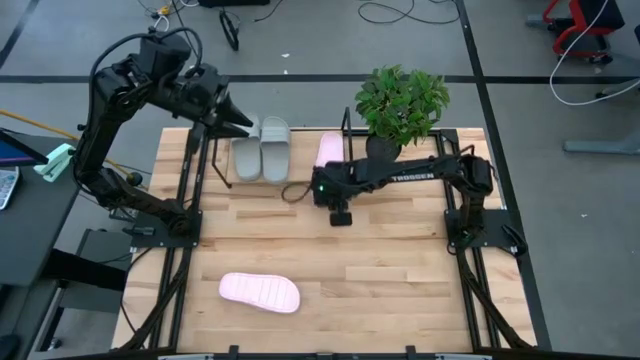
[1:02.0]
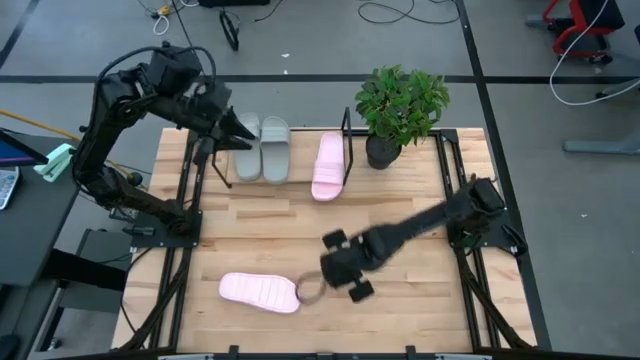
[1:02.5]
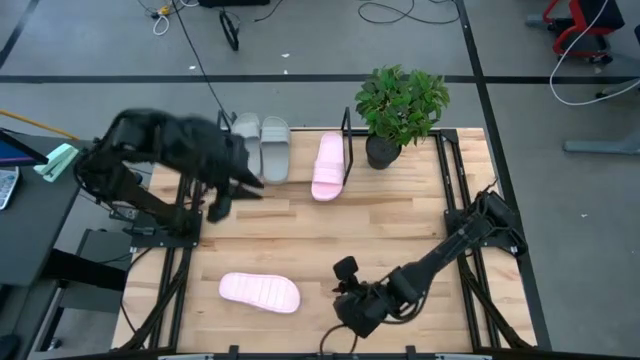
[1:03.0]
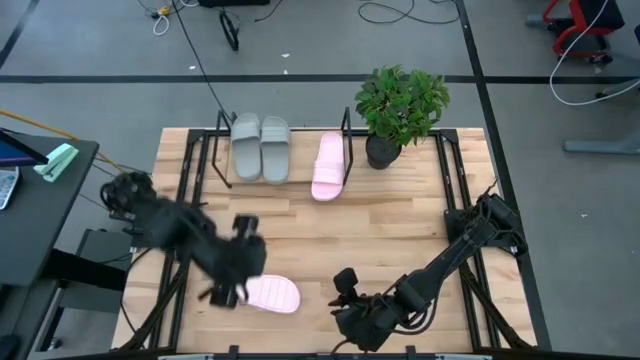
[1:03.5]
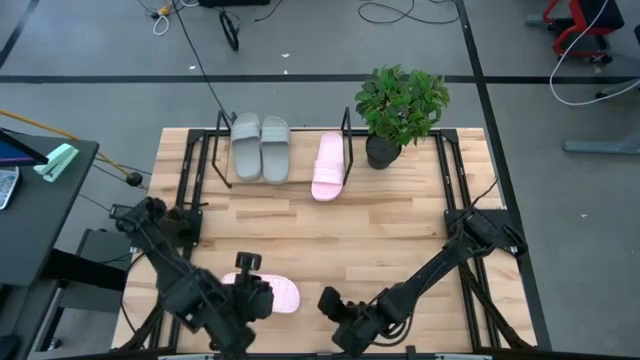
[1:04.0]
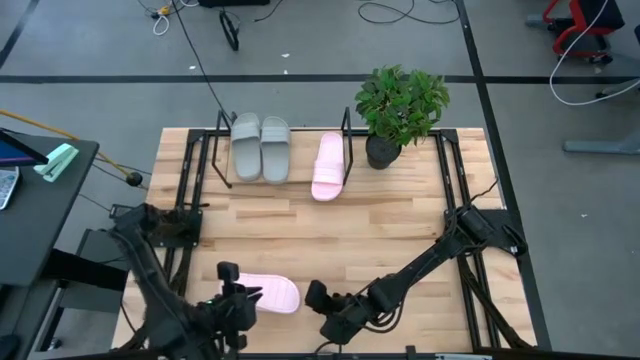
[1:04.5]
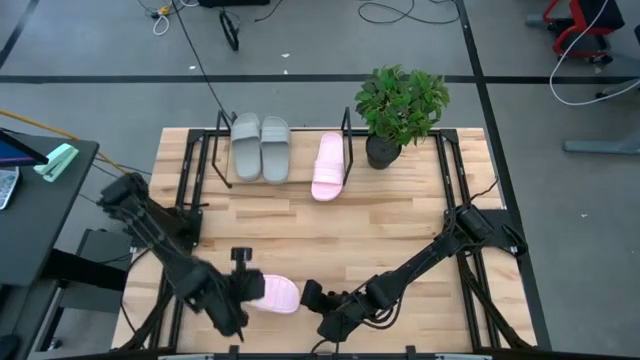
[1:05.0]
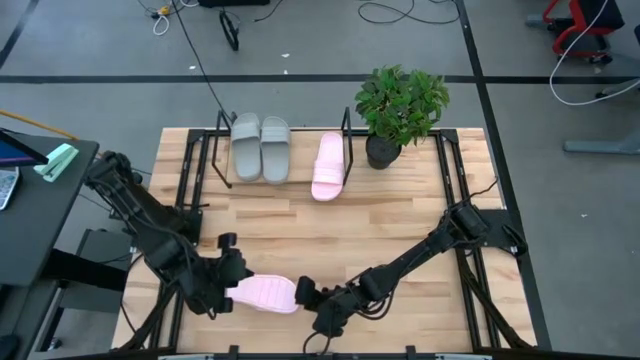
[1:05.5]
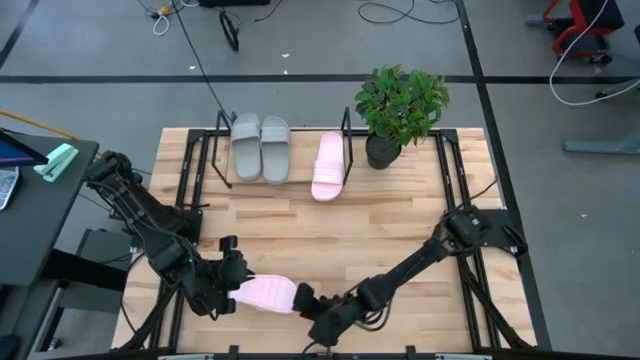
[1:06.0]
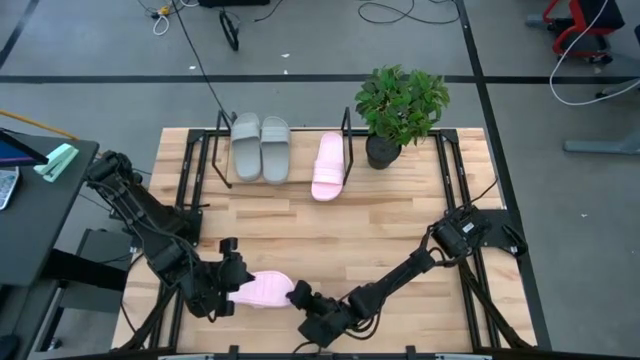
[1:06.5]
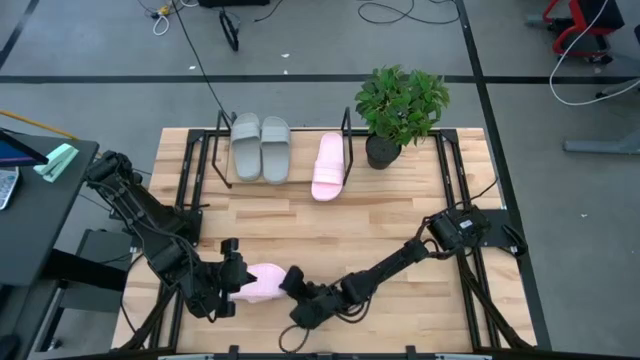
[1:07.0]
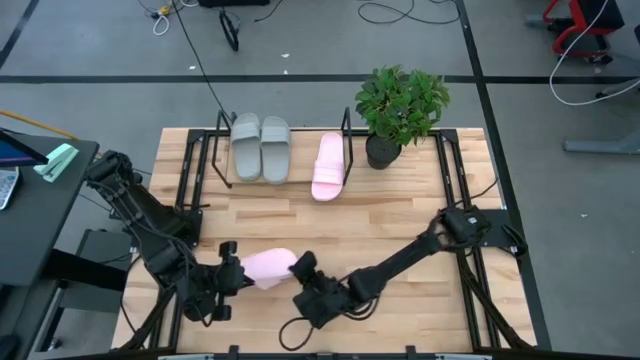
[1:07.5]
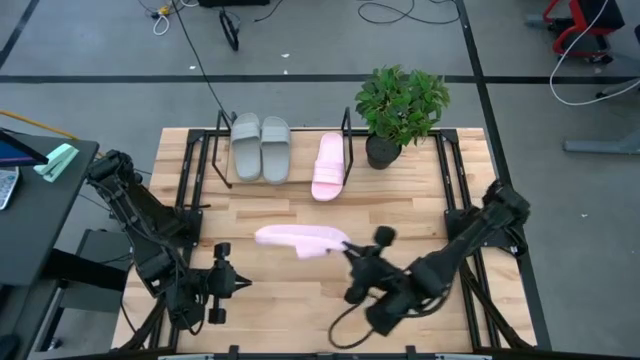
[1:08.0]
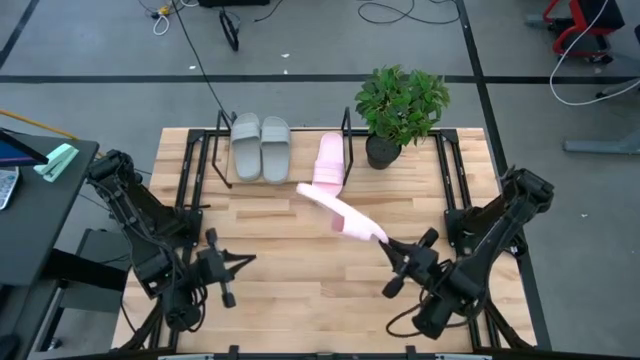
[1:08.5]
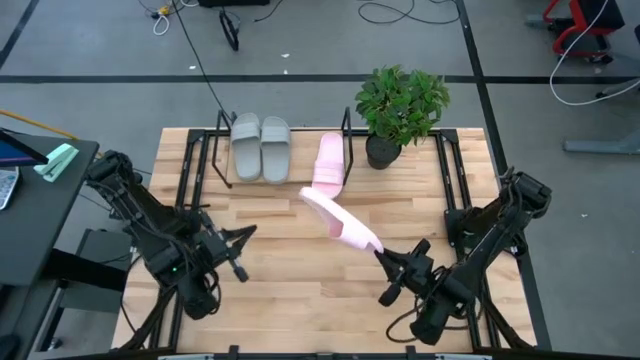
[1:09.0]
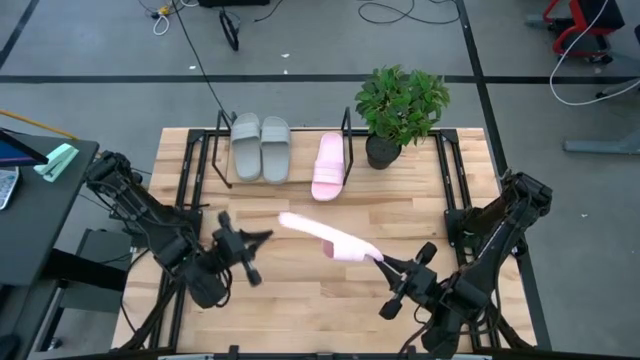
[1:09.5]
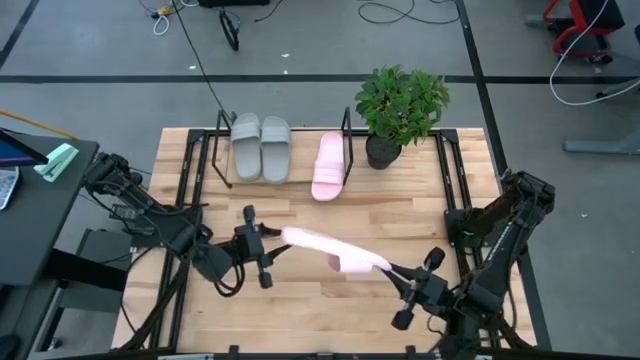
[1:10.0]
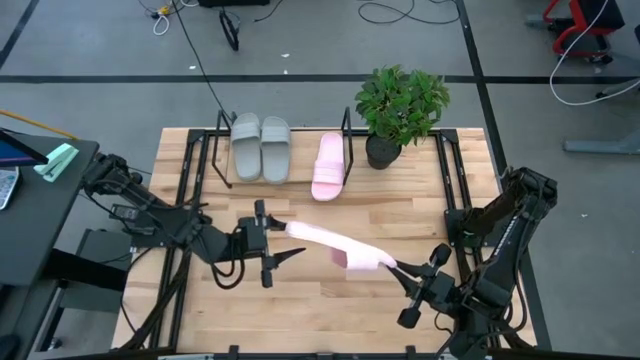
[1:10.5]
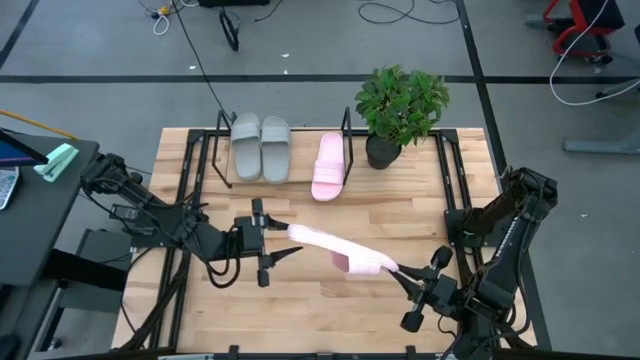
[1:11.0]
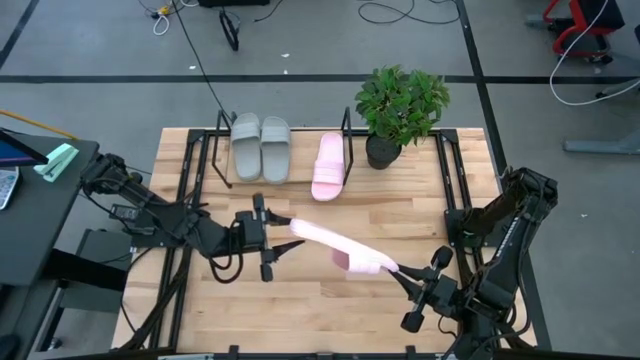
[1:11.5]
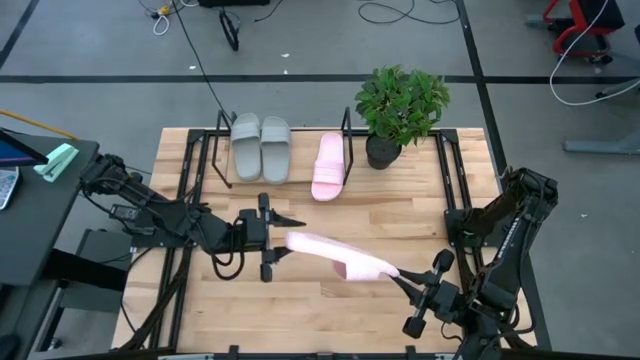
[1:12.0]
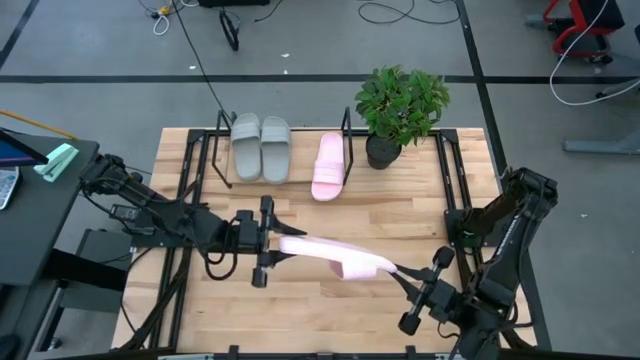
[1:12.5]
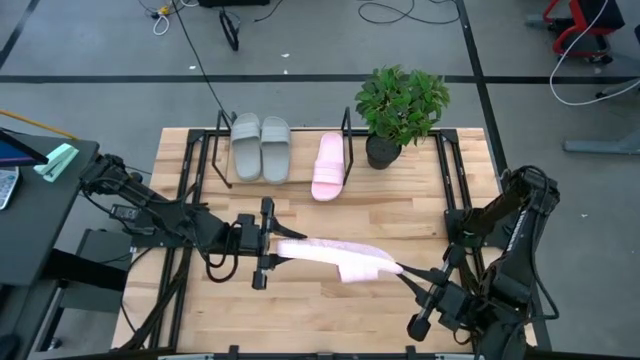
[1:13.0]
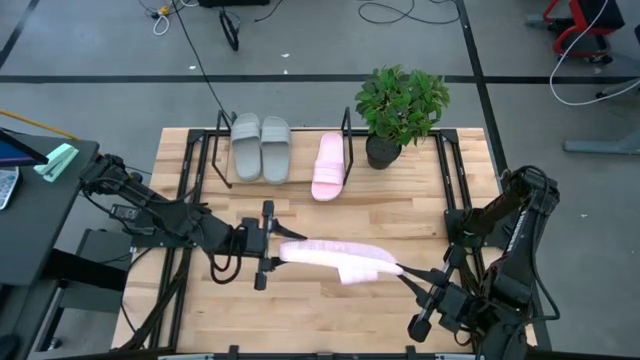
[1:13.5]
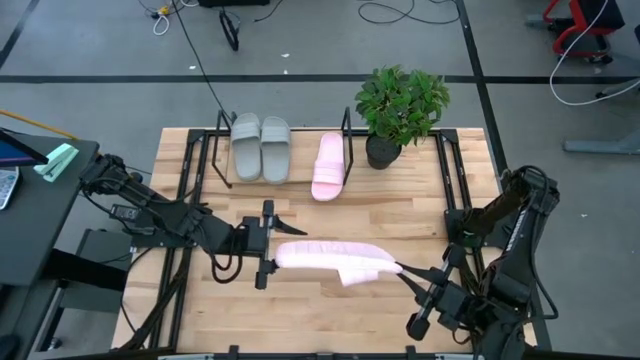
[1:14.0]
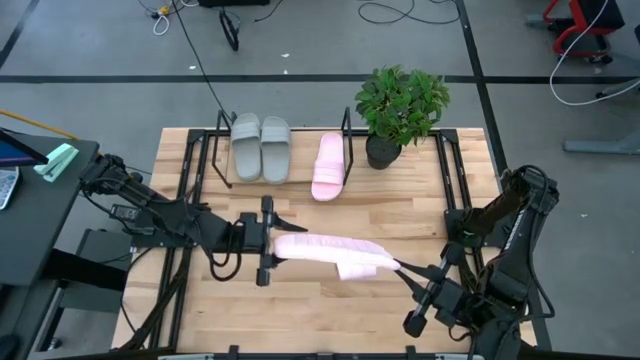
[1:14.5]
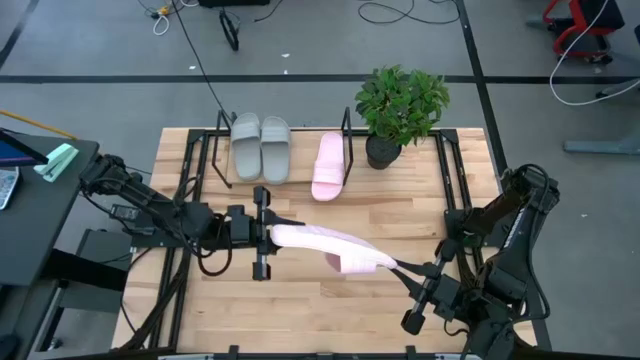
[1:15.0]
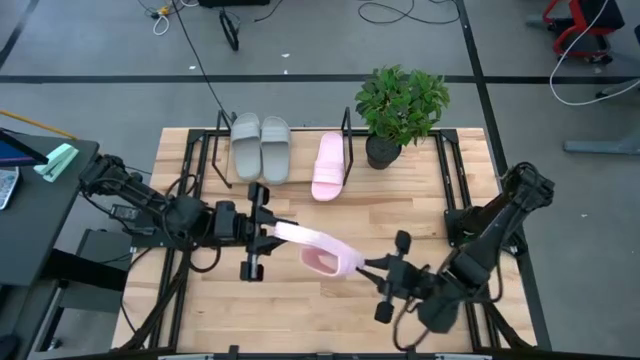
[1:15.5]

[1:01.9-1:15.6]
Task: Pick and place slides into the shelf
Put the pink slipper on the shelf

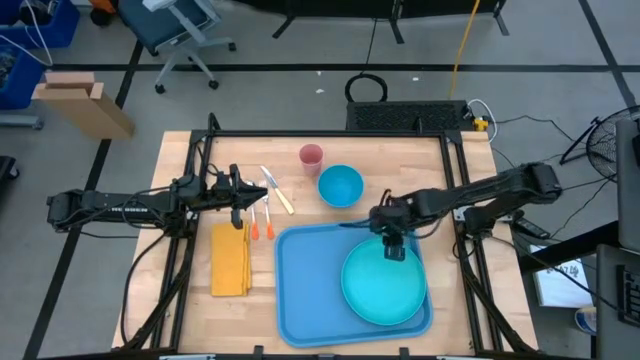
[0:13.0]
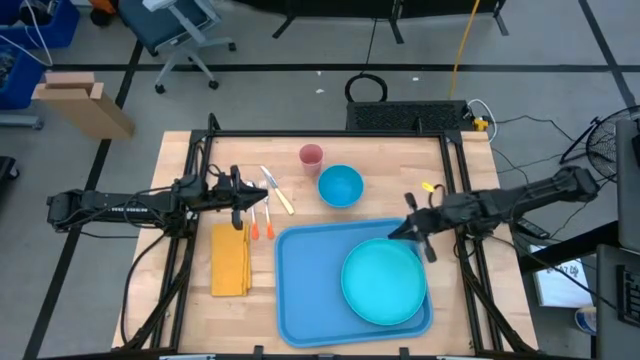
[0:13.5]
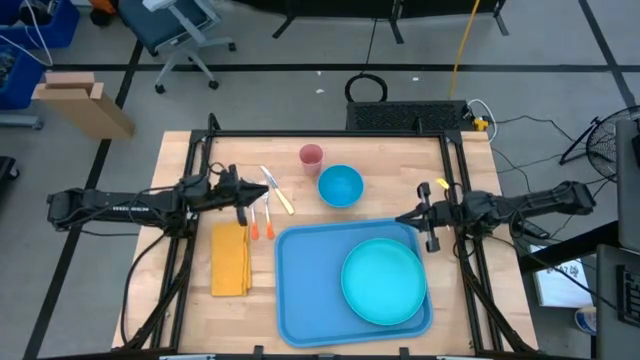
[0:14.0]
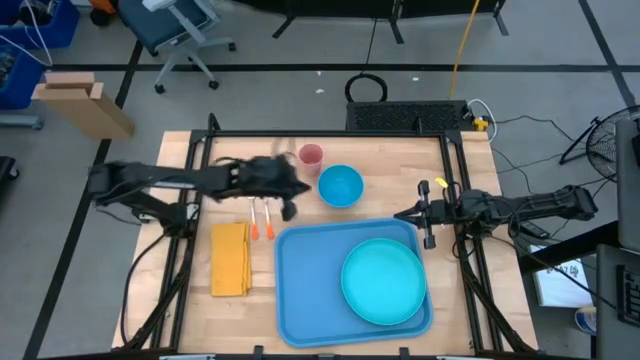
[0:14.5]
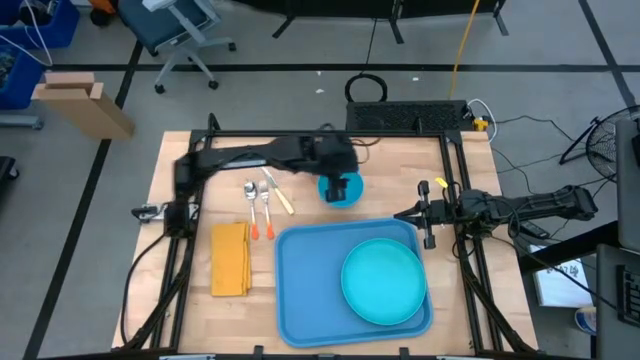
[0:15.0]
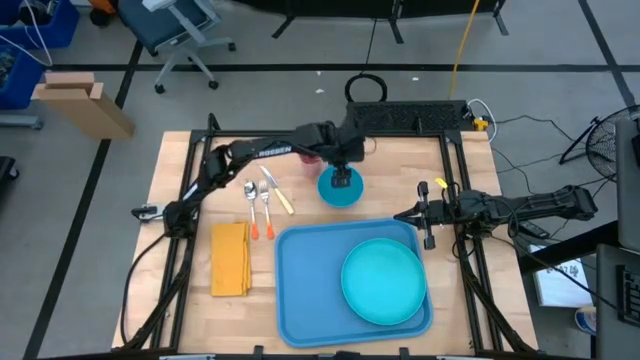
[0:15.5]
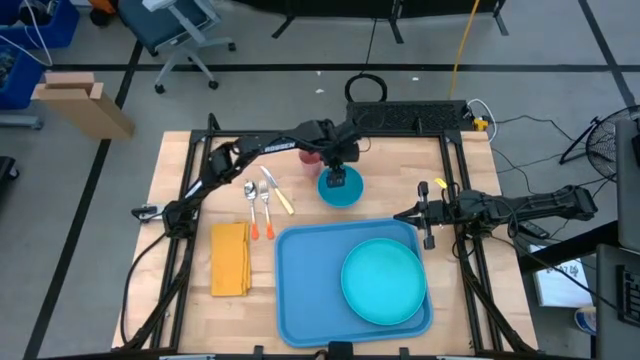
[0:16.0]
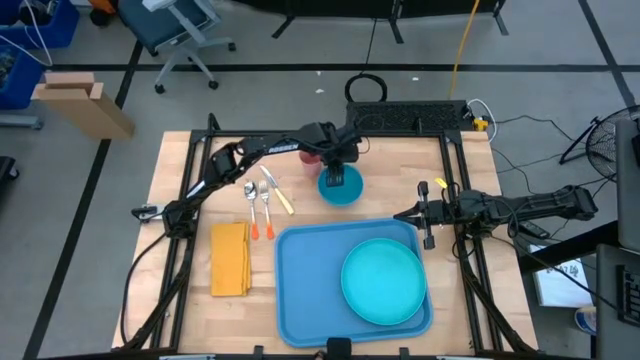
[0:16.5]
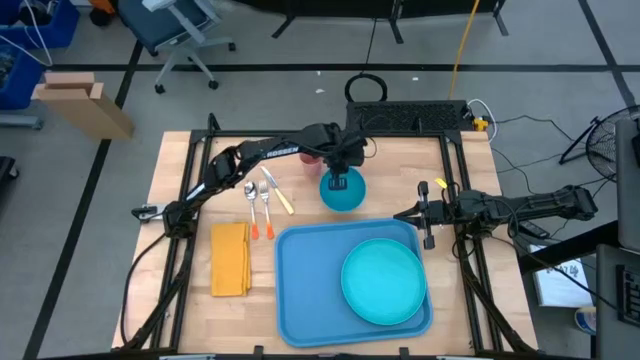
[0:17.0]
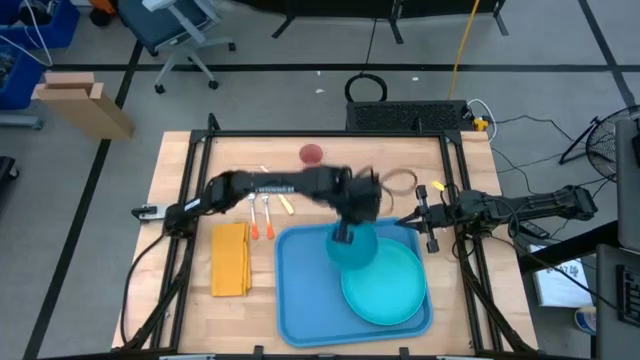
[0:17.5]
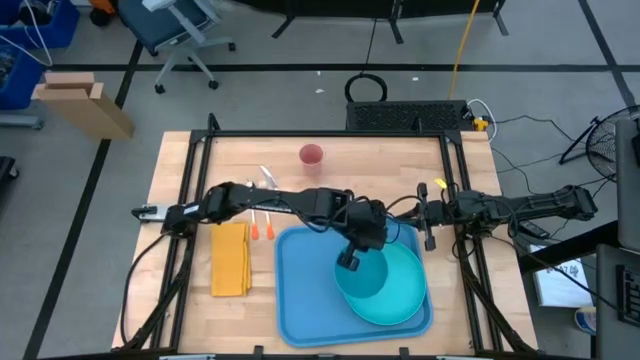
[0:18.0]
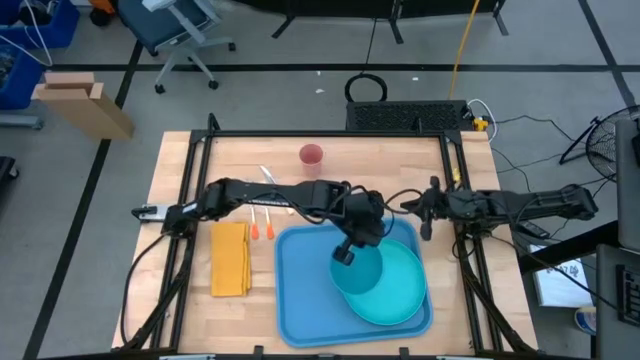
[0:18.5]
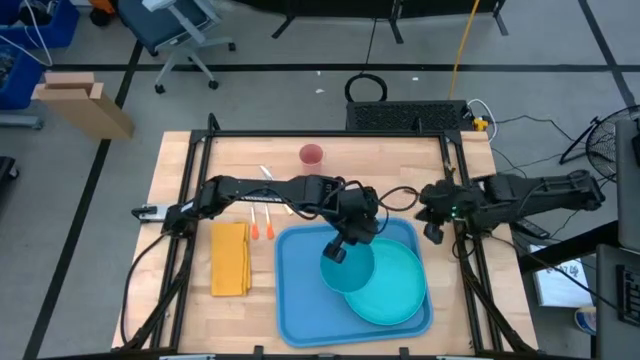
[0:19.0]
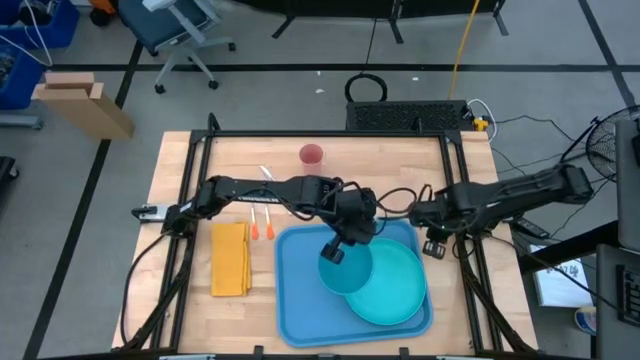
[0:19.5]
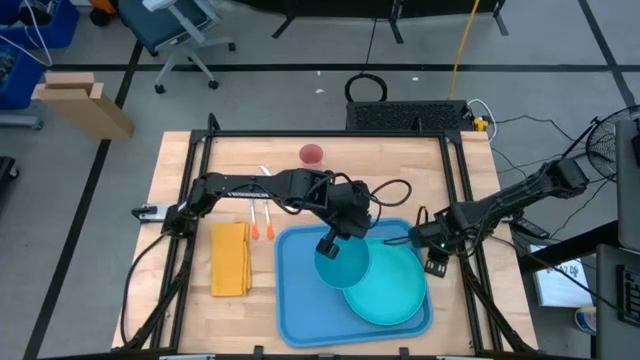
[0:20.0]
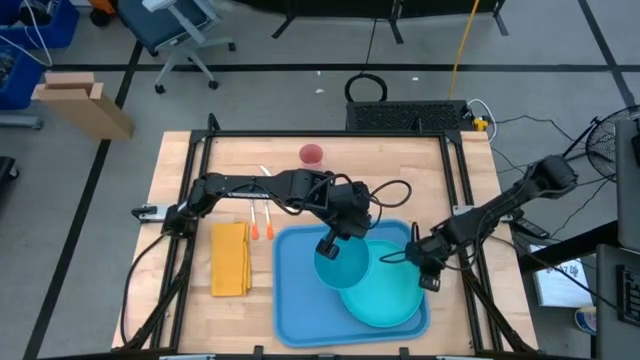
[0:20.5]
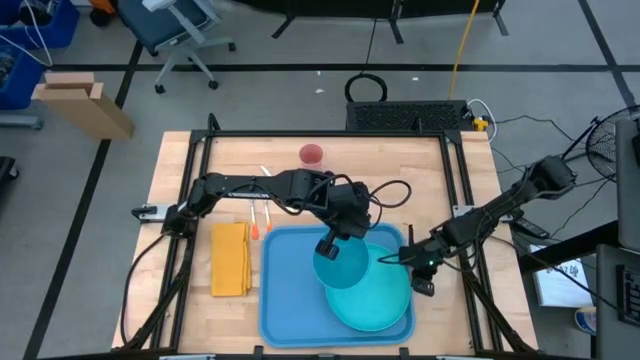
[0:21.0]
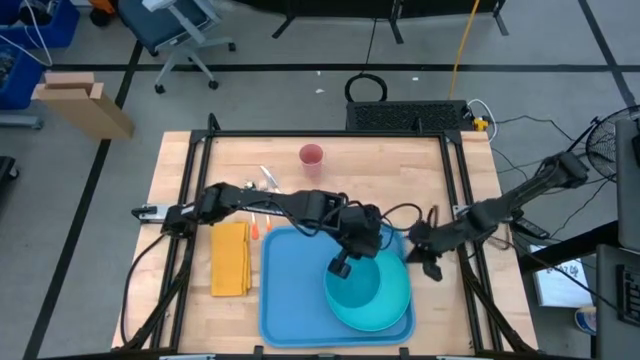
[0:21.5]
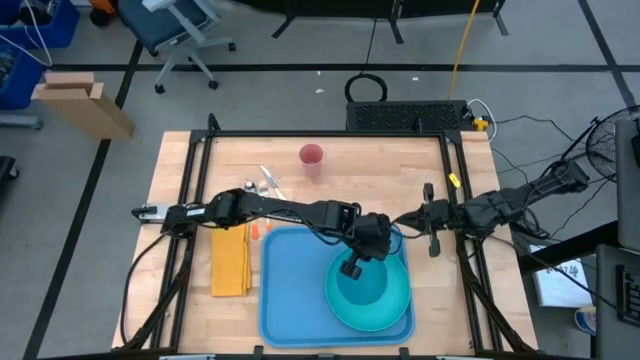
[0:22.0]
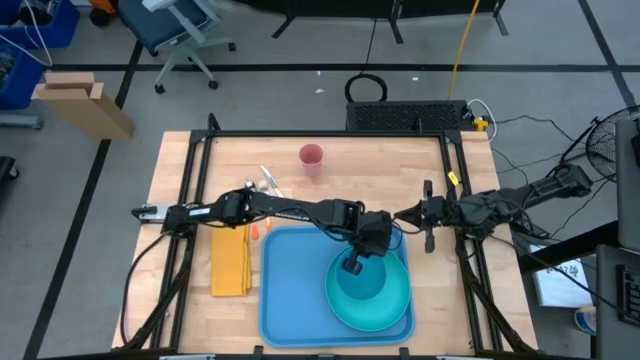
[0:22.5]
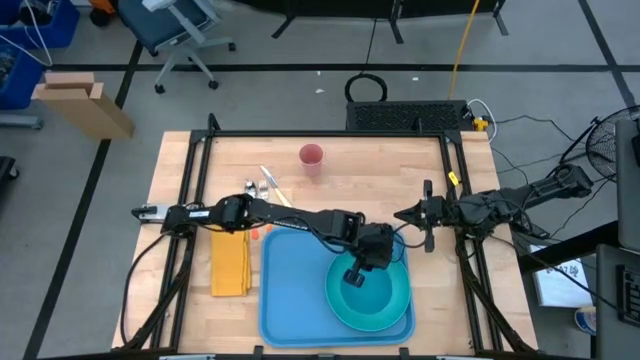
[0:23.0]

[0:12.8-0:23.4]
Task: Set up tray
Put the blue bowl on the light green plate on the blue serving tray
